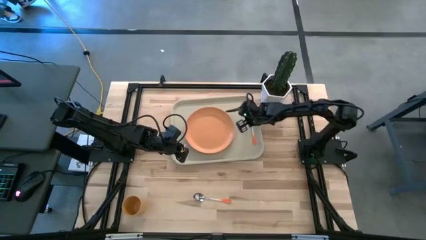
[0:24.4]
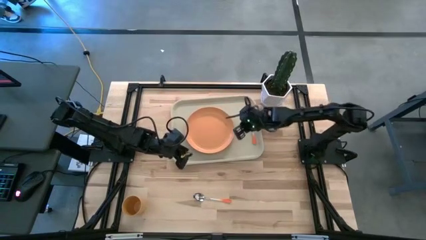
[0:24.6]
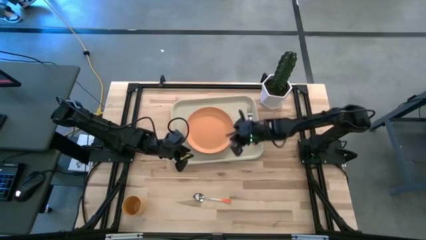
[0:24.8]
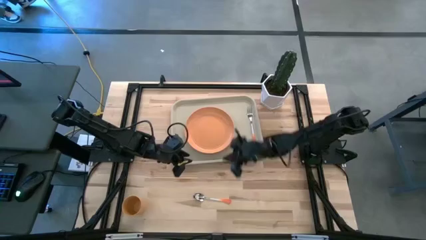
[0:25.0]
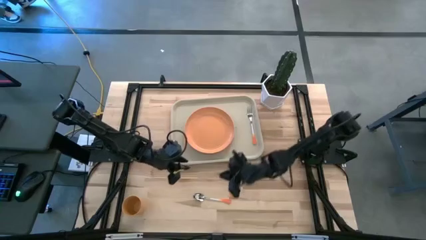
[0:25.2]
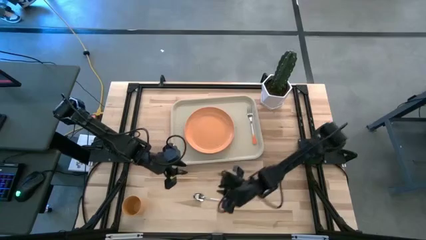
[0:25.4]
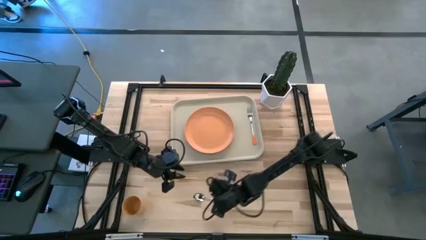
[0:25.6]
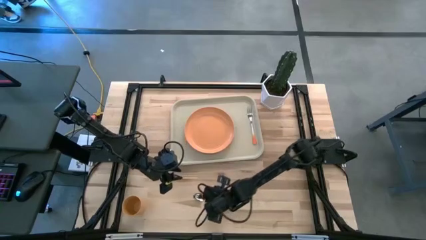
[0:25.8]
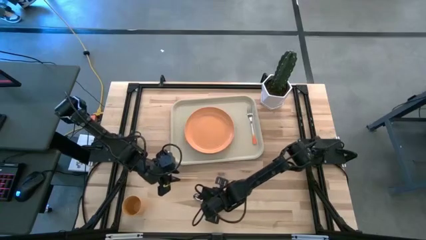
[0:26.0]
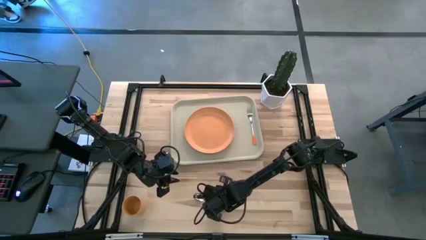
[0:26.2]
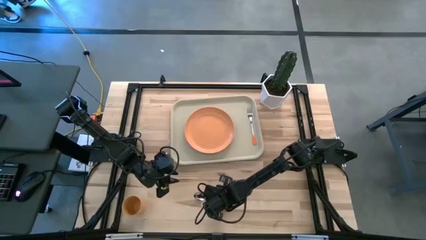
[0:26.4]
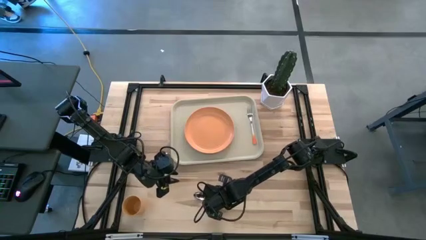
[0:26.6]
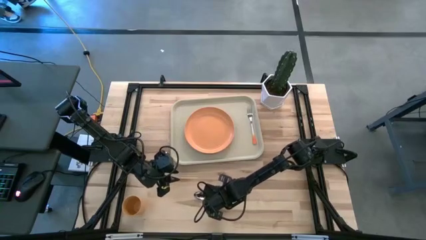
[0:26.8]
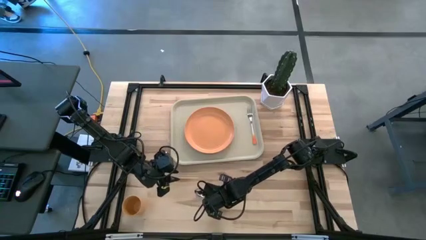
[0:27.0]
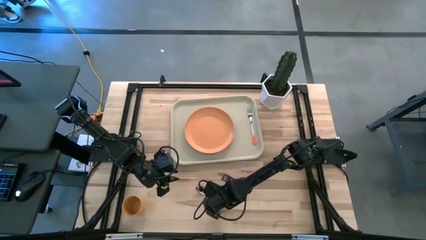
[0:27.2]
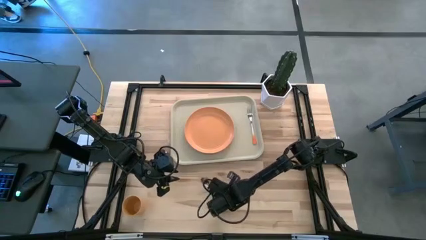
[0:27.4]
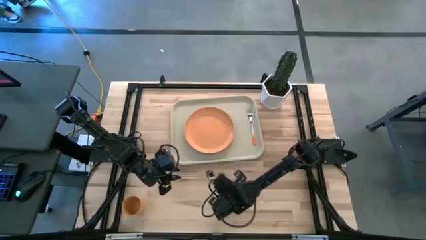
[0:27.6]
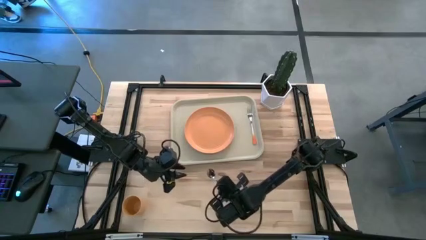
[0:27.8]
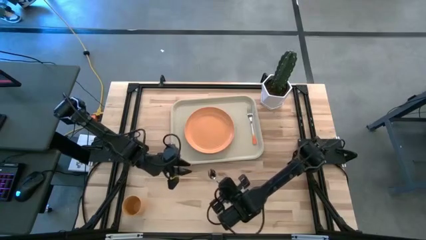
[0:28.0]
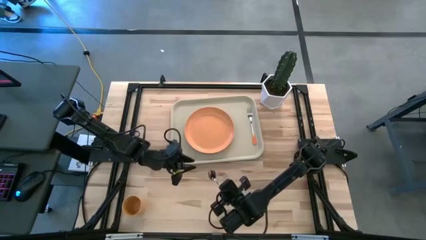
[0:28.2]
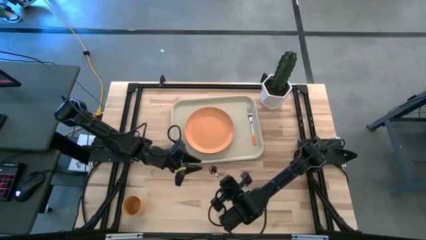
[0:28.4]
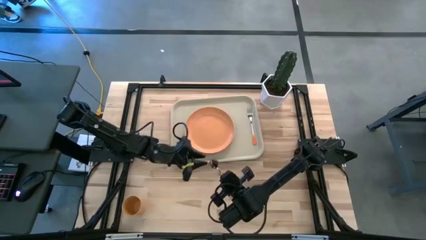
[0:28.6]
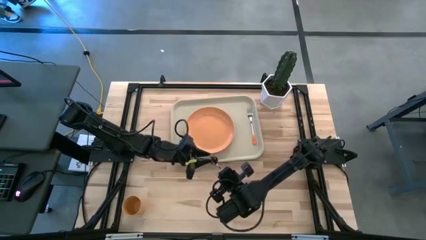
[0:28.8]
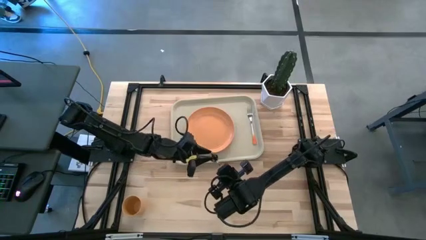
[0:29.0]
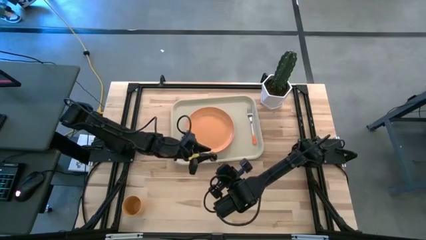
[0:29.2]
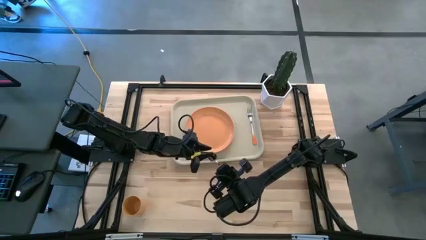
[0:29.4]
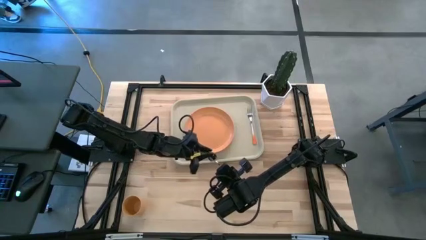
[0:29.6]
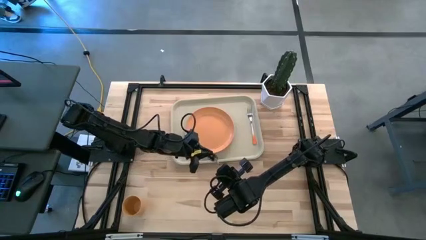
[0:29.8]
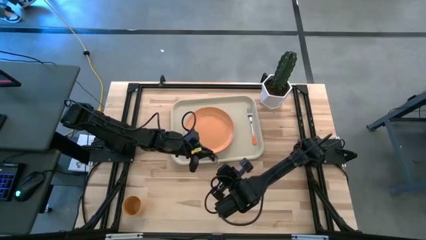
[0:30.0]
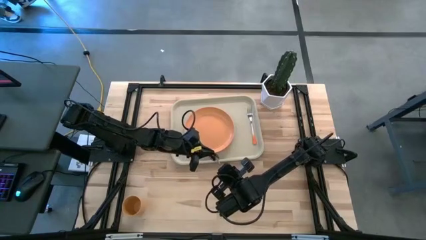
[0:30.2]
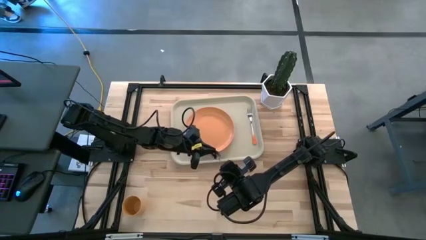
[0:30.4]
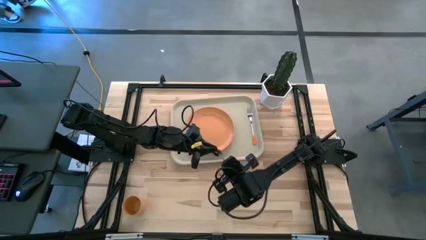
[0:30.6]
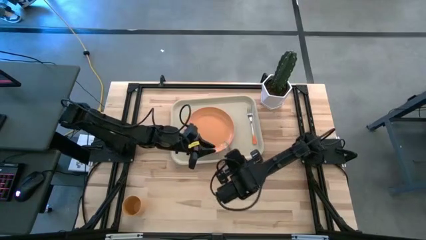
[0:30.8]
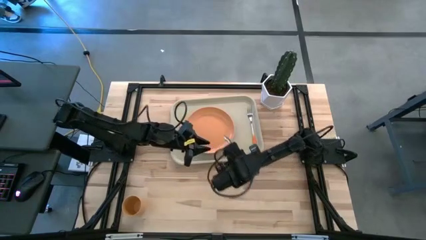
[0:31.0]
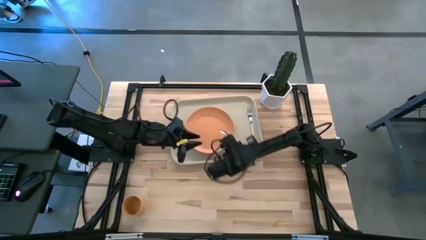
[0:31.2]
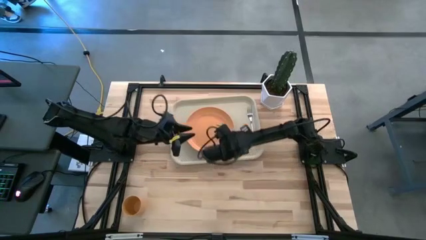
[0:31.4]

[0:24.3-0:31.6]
Task: Pick and place plate/cup/fork/spoon on tray
Put the orange spoon on the gray tray to the right of the orange plate

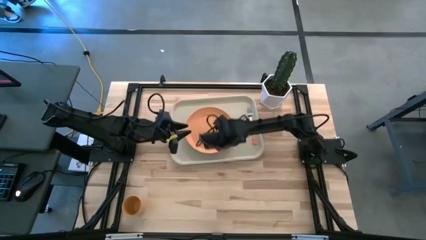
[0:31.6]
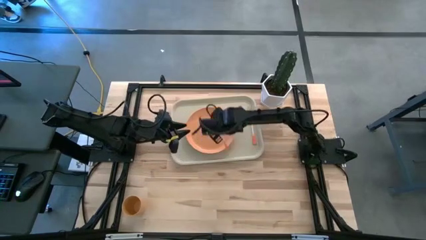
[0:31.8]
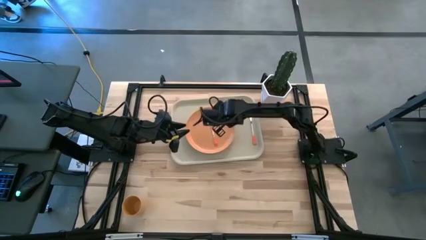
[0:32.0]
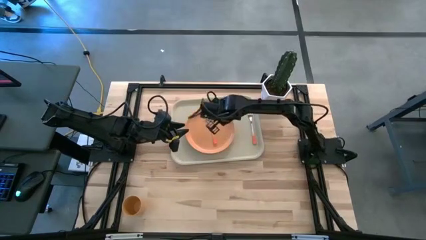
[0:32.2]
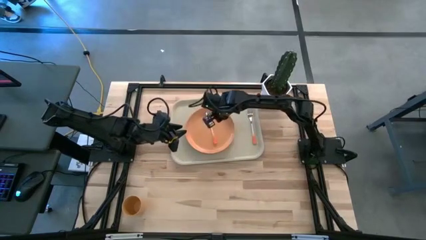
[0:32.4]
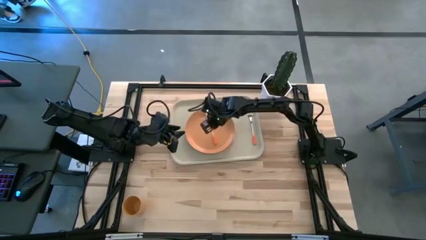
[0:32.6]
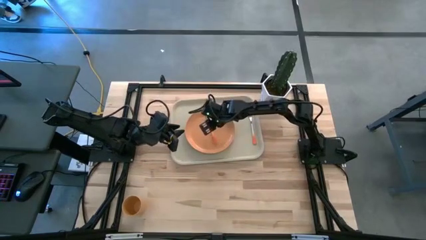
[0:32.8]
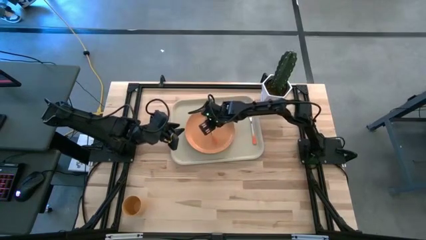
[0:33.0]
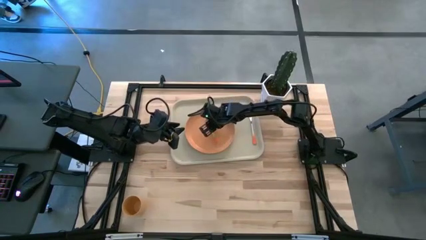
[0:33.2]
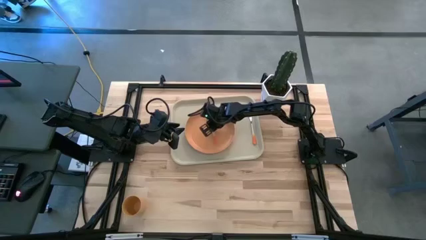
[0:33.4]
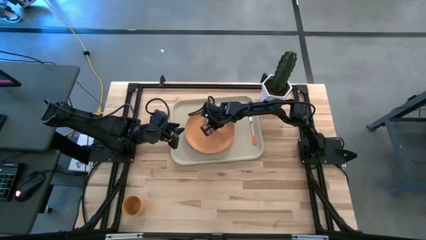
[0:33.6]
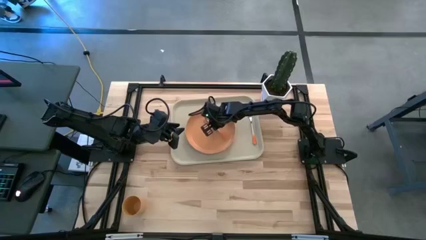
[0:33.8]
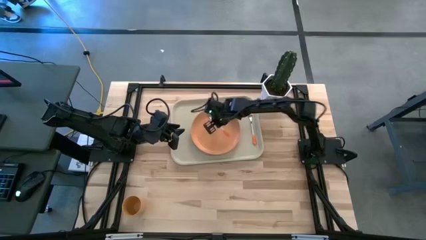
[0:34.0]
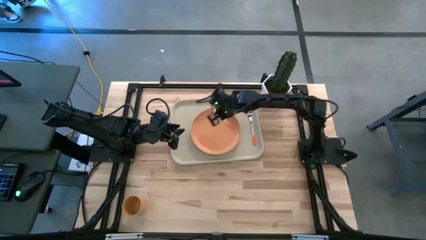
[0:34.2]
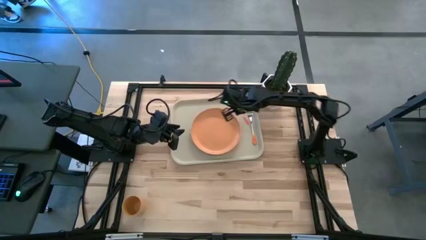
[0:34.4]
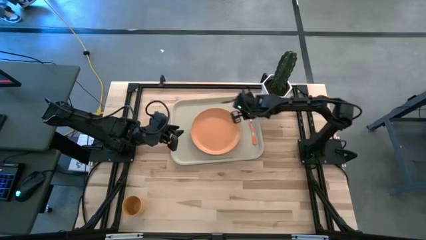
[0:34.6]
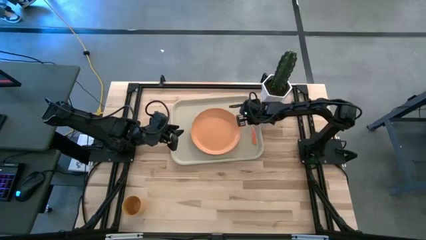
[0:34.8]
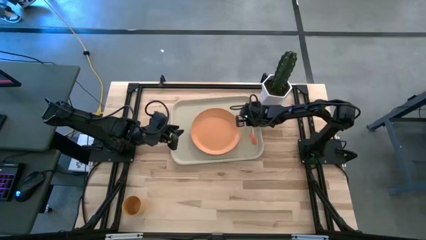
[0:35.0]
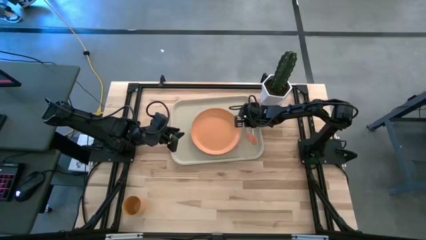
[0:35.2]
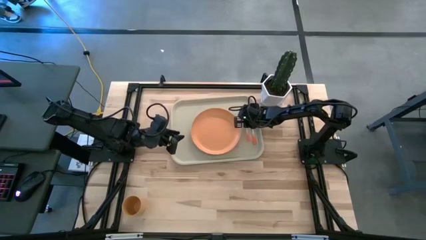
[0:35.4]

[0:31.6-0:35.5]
Put the orange spoon on the gray tray to the right of the orange plate

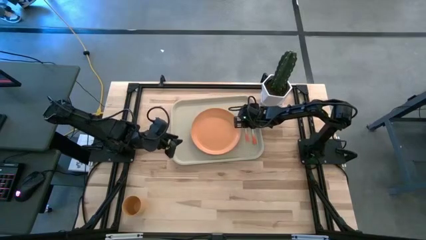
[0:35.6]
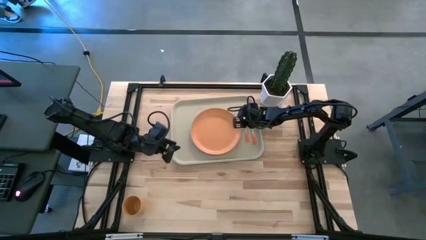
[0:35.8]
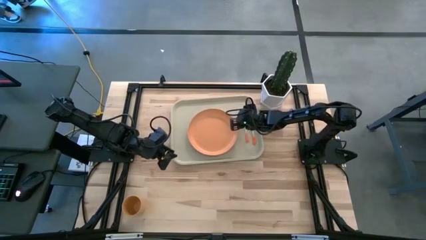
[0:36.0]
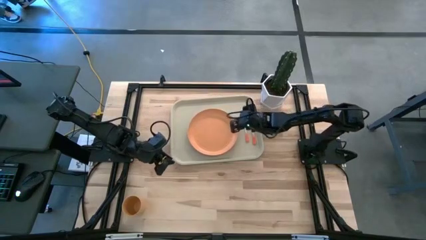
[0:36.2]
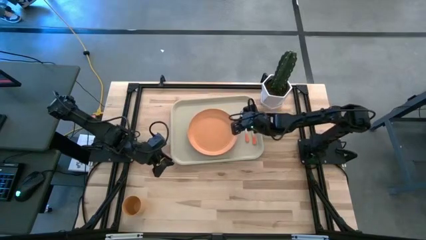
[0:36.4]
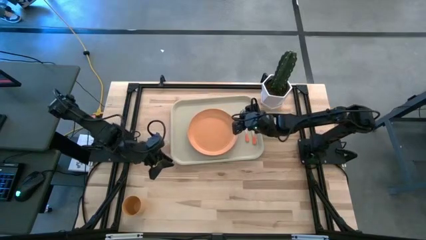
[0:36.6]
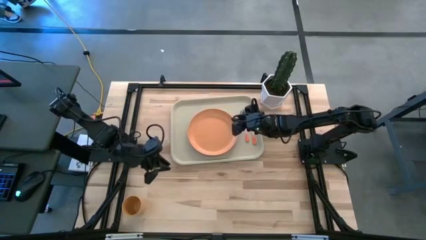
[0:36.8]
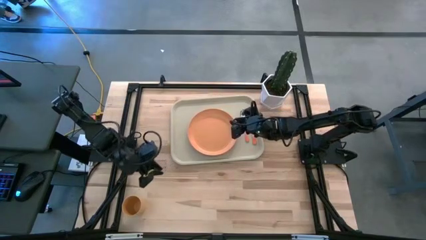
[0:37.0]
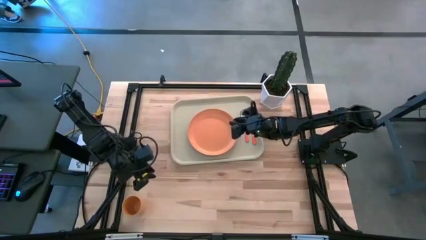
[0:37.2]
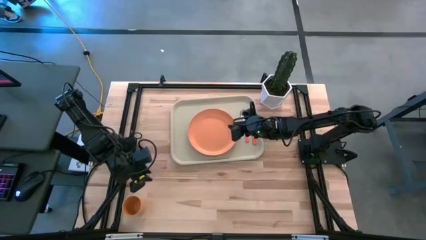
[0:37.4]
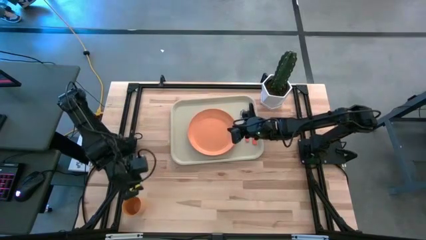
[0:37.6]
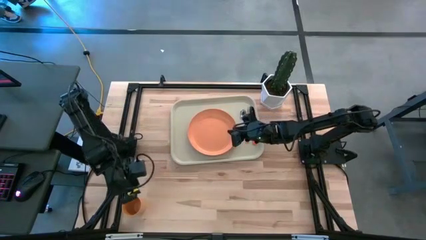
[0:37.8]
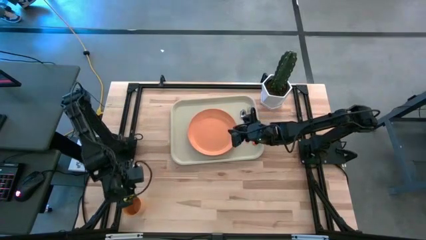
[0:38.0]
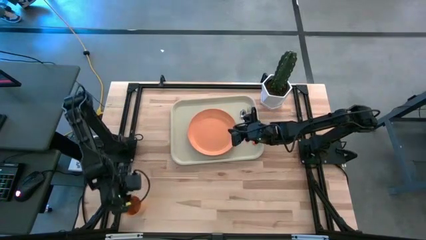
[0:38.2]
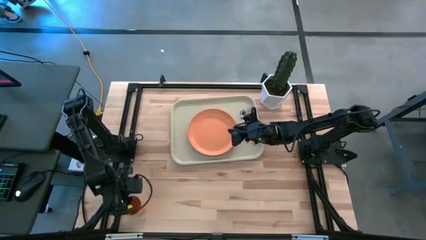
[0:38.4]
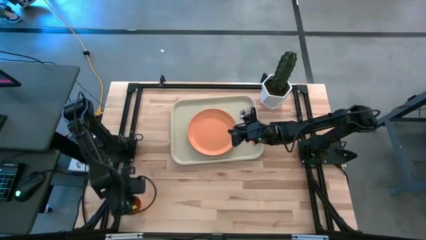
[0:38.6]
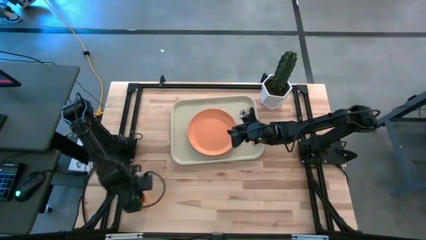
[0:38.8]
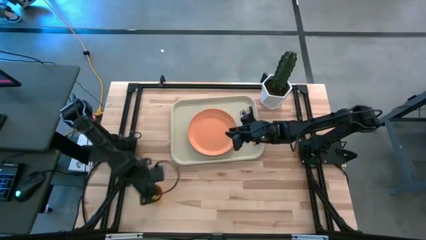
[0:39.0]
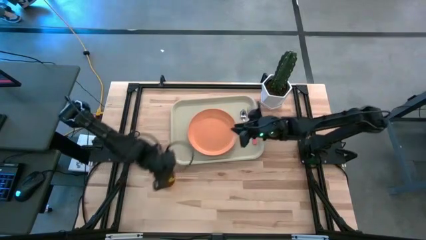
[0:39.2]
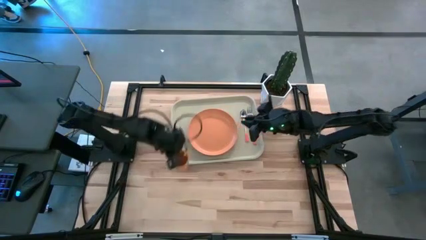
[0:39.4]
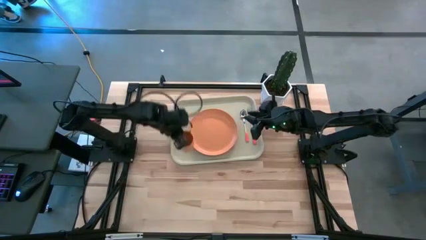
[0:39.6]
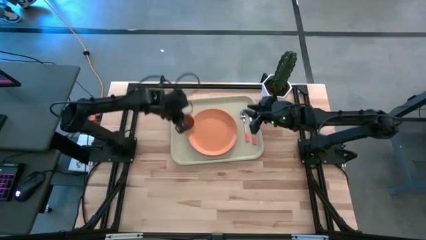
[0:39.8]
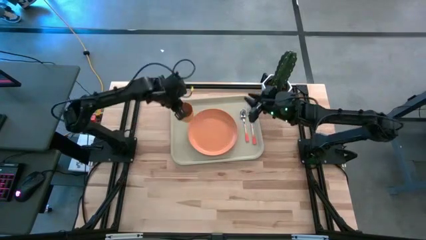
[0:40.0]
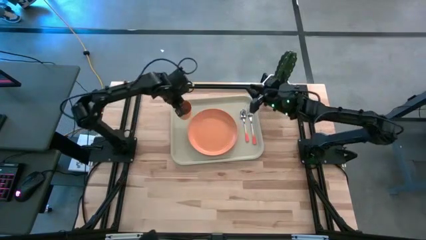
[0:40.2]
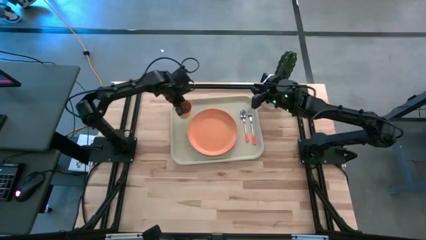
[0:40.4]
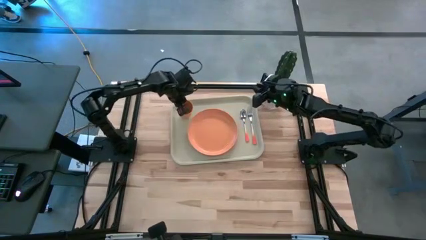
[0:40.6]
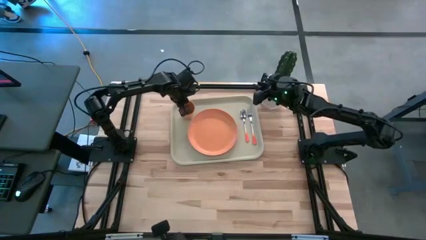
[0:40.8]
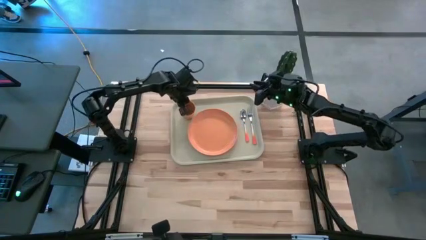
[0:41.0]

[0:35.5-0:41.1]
Put the orange cup on the gray tray to the top left of the orange plate
